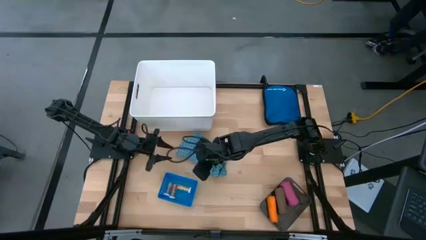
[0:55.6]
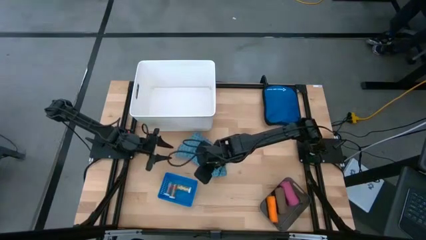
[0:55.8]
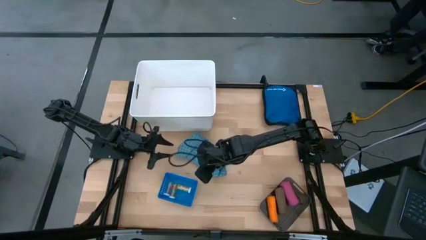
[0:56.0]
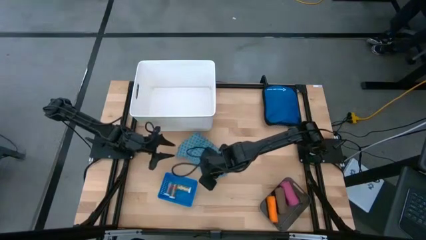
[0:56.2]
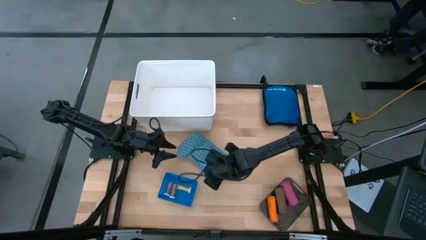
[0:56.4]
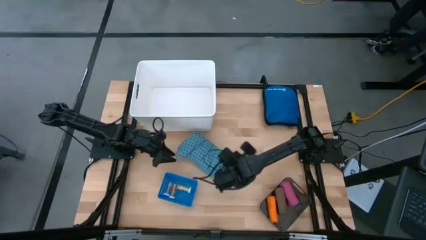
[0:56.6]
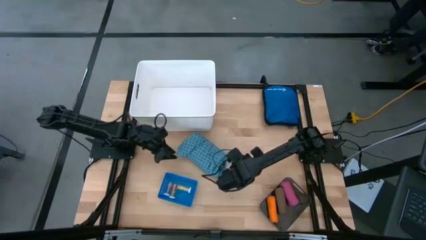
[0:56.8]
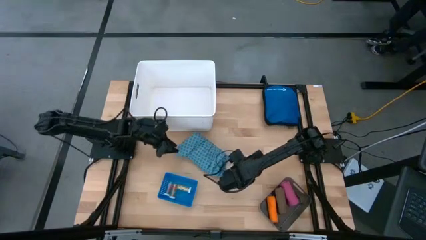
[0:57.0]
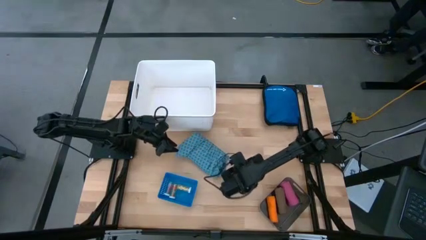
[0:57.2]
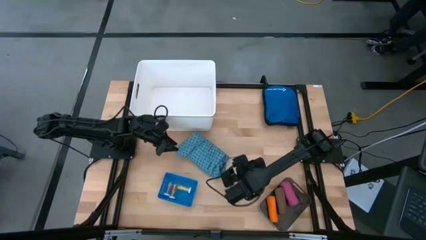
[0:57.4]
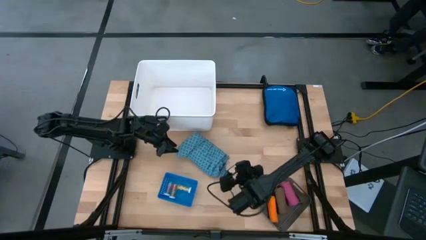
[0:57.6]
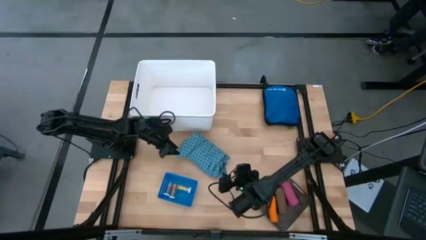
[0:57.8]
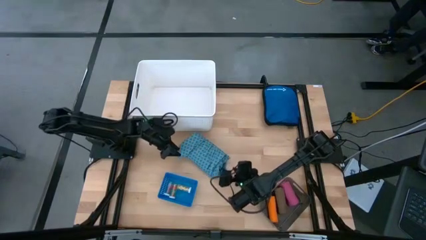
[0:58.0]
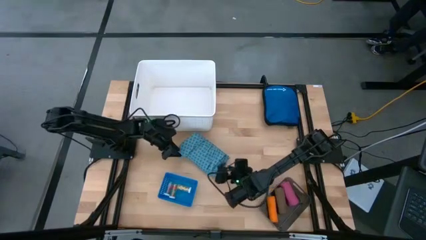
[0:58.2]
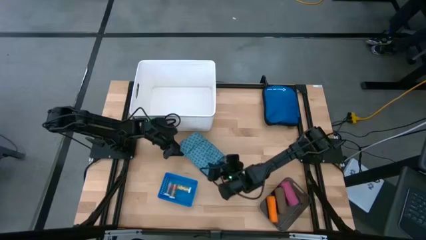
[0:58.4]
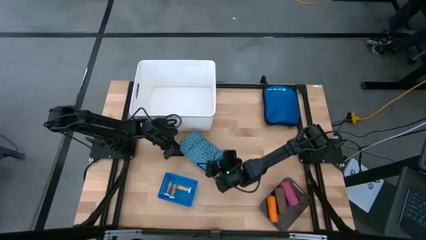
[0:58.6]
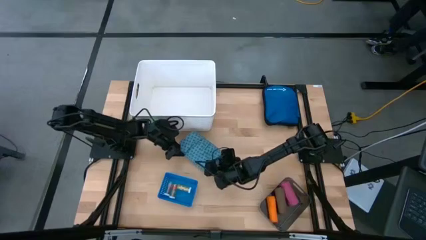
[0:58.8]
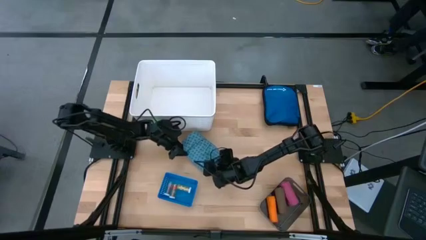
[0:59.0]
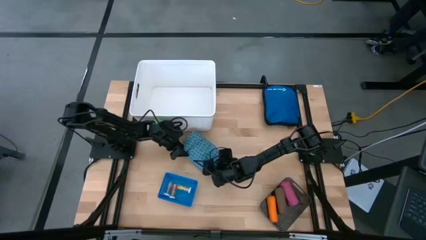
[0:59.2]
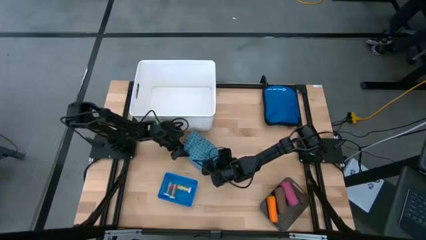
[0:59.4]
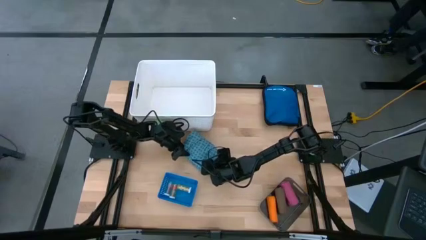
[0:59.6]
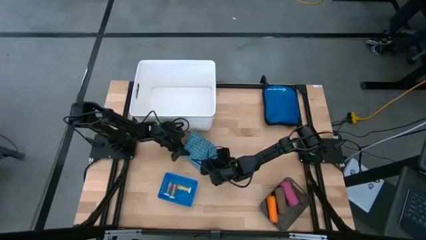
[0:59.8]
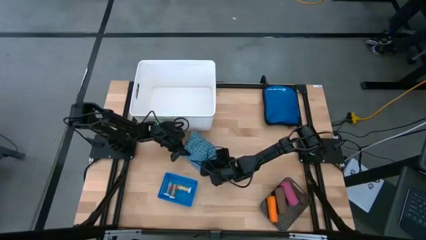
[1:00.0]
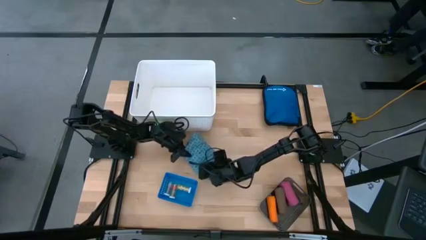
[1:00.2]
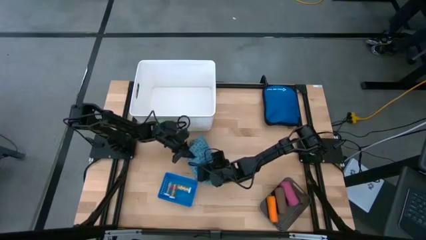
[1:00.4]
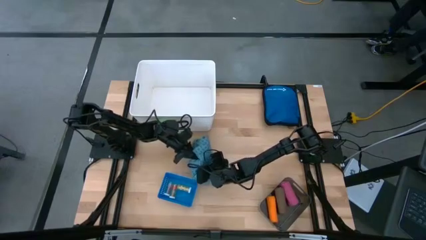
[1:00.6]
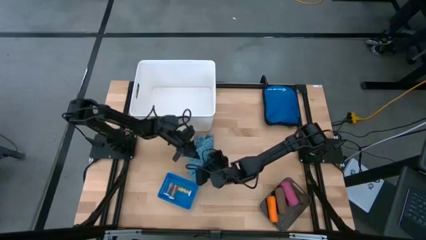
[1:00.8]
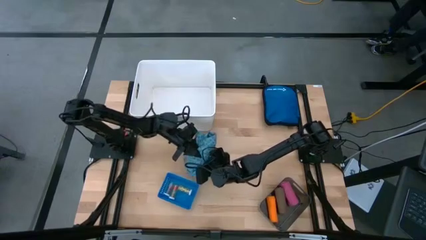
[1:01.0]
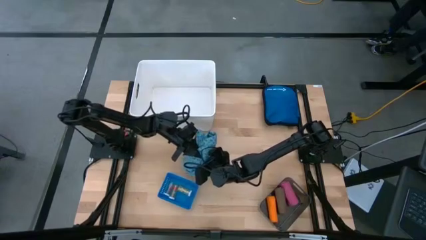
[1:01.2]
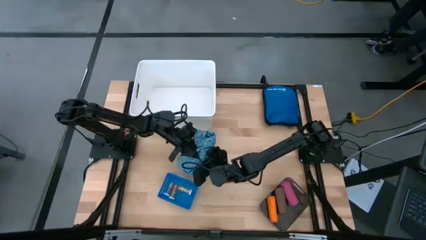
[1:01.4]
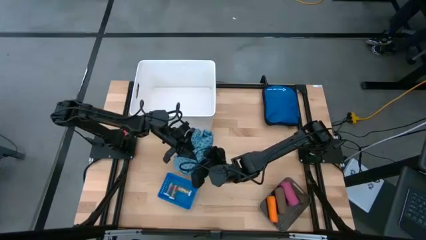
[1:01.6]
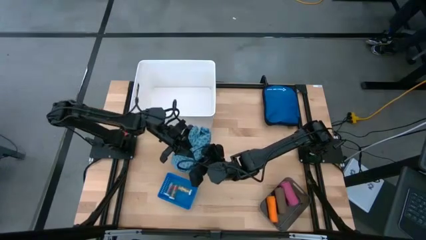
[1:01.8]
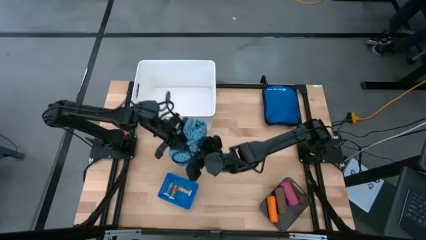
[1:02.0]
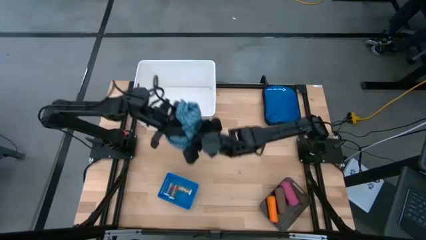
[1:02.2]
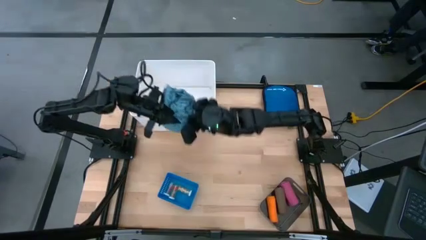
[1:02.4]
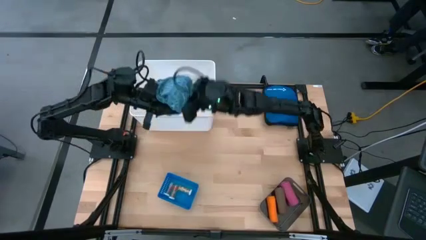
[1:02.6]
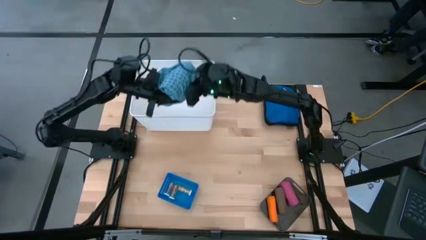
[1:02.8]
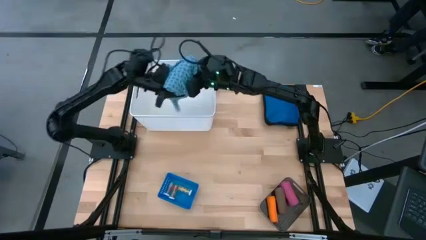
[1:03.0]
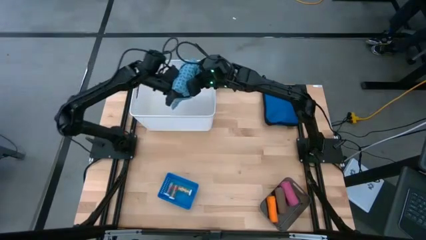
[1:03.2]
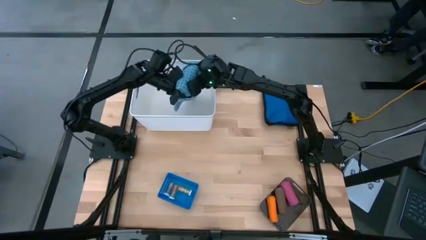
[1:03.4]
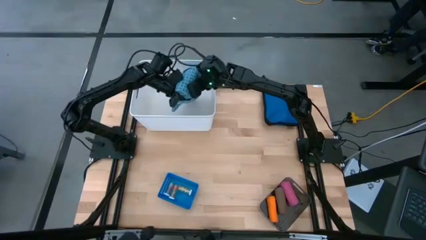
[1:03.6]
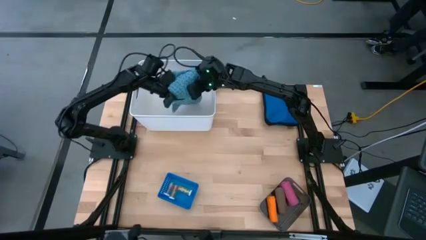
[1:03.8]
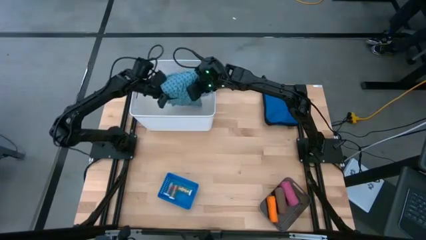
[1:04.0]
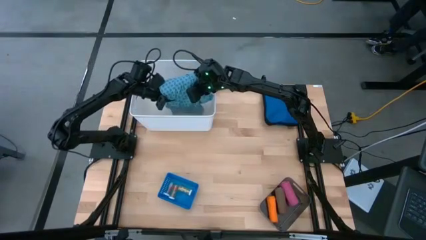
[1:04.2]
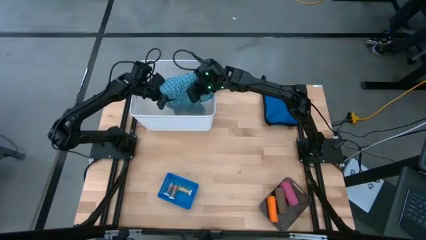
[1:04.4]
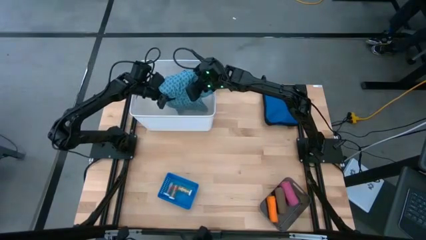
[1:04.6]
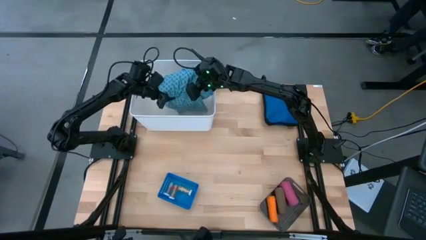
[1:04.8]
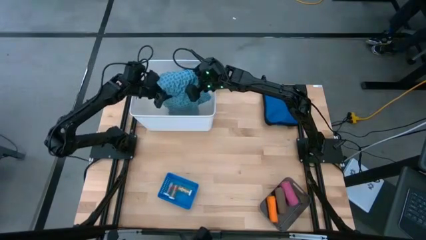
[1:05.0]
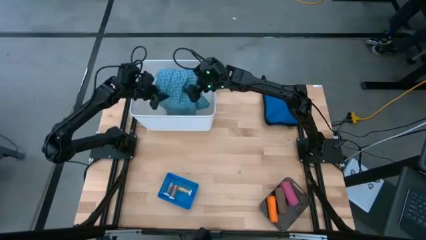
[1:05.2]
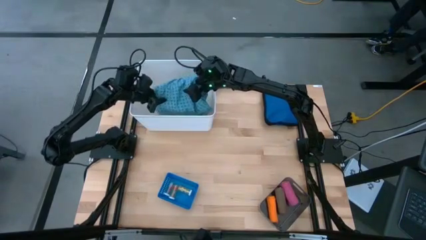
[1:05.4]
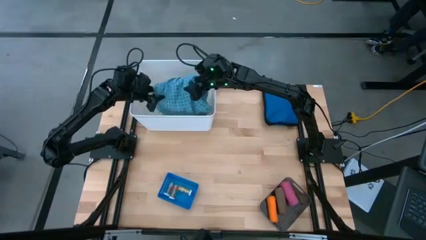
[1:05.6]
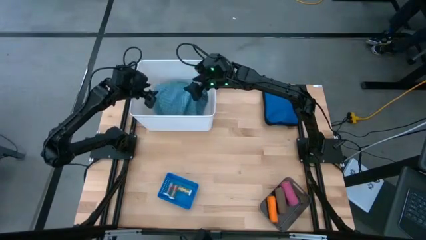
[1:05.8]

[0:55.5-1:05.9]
Task: Pick & Place Medicine items
Put the blue patient gown into the white bin

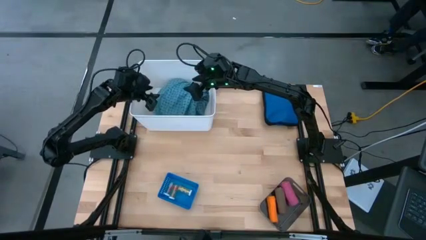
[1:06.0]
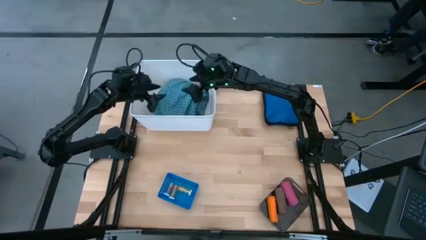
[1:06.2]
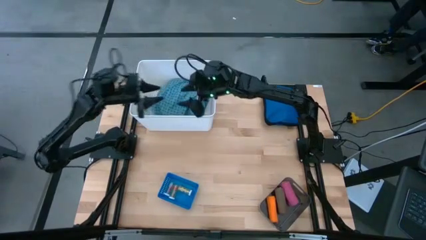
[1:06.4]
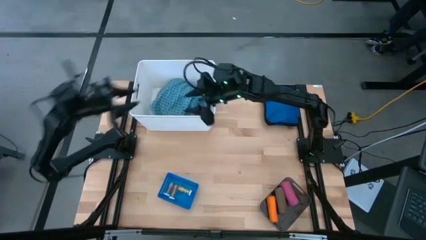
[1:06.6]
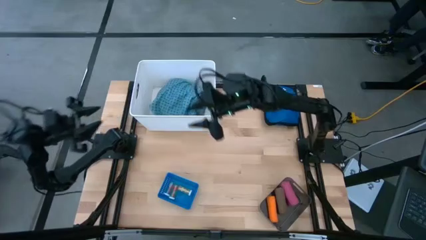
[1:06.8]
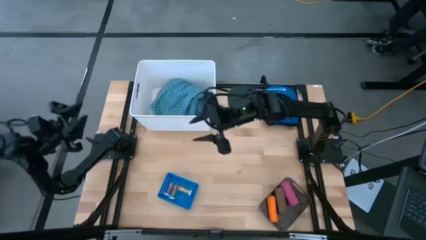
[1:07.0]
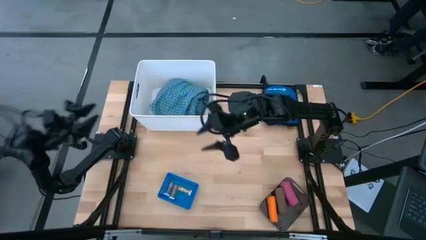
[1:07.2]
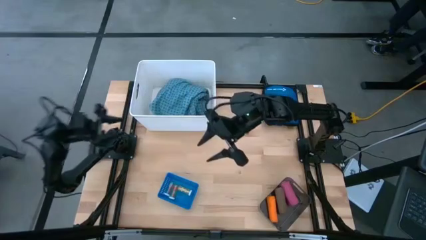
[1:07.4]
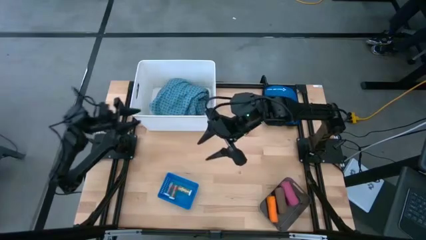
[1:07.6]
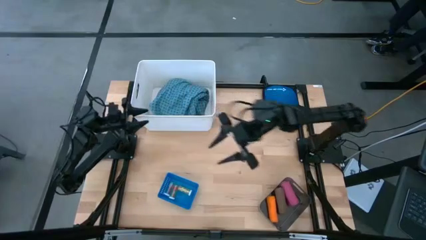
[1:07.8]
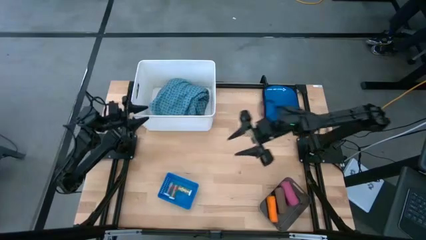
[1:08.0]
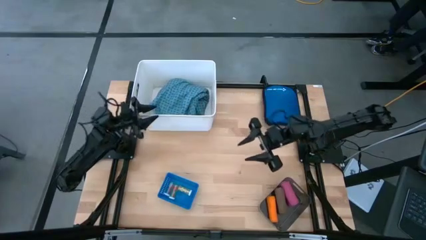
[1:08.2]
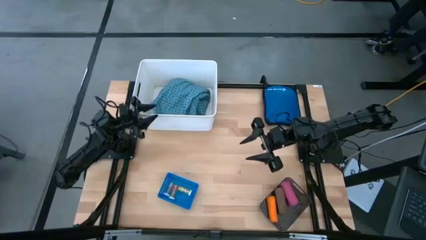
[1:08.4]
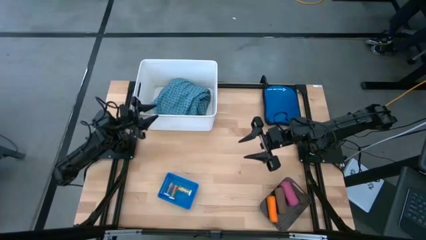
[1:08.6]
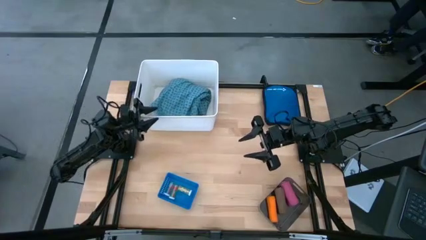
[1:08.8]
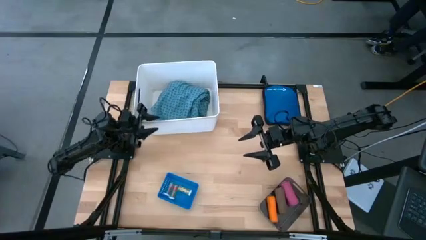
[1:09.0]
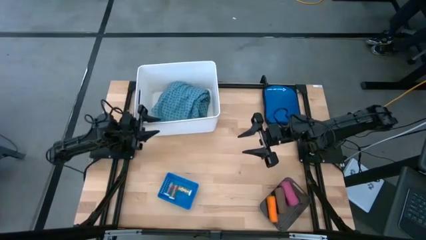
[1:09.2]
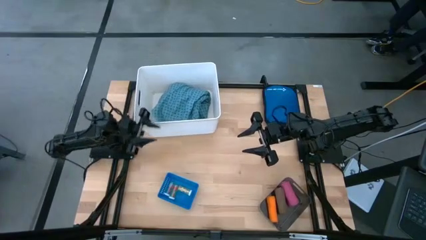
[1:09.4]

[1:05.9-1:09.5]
Adjust the white bin on the table
